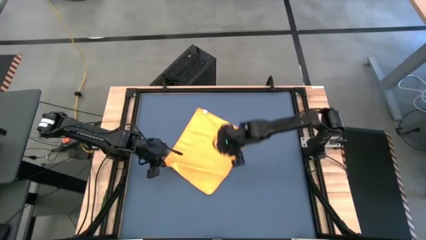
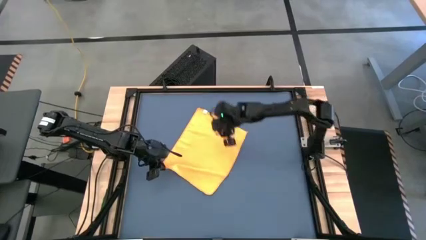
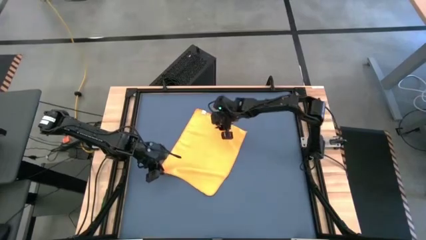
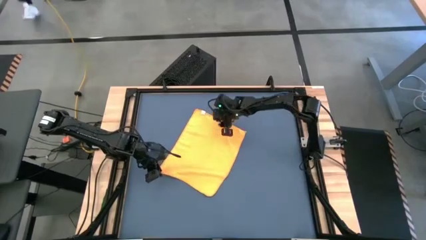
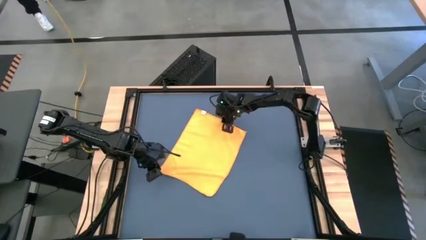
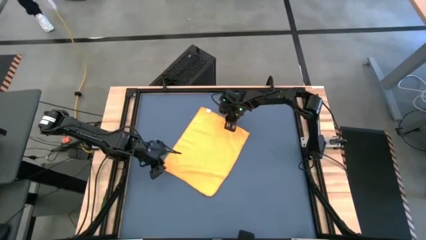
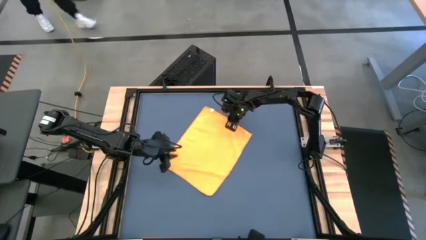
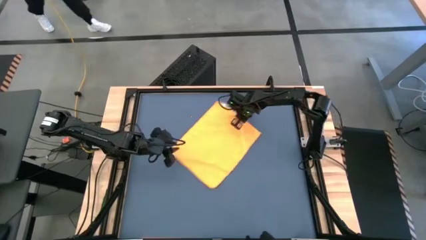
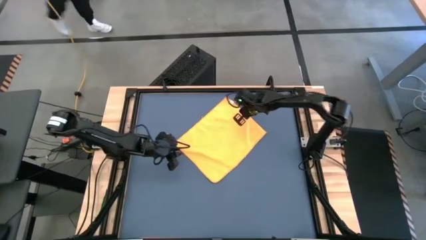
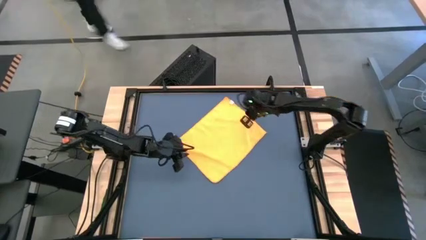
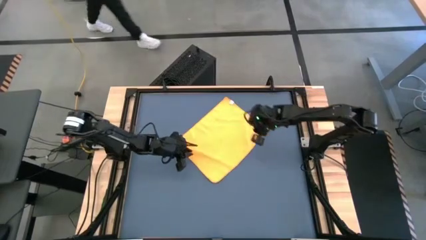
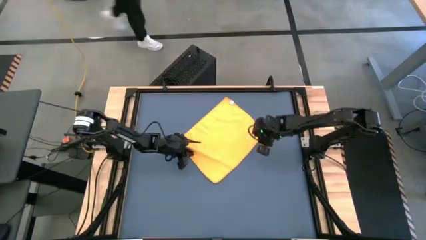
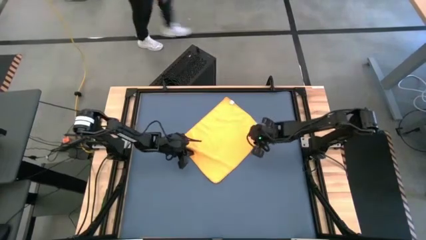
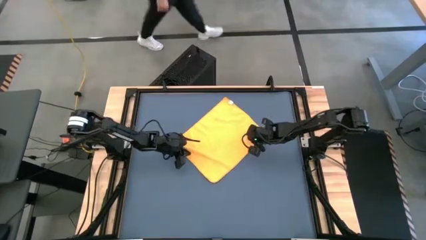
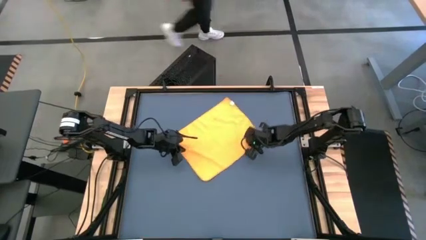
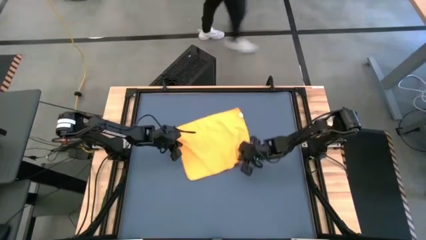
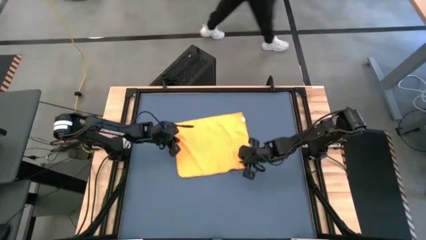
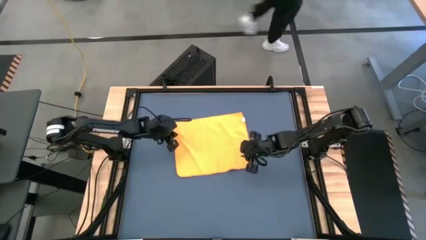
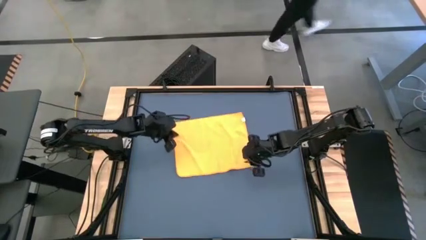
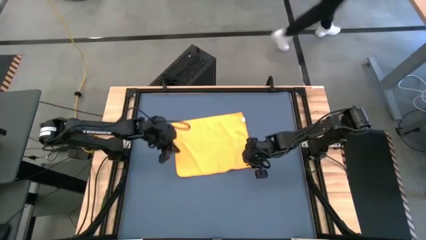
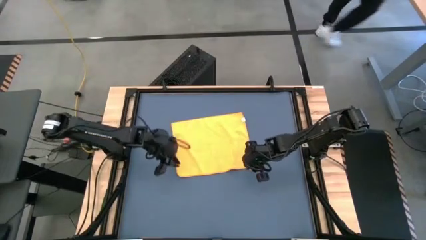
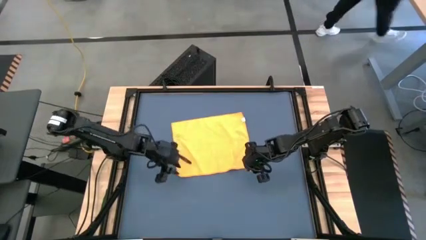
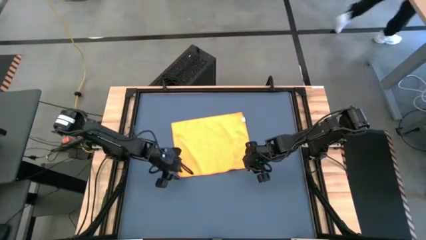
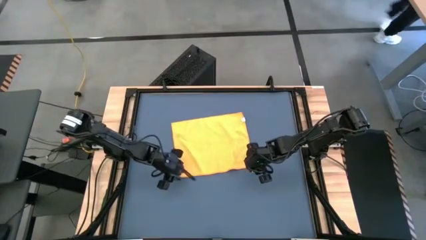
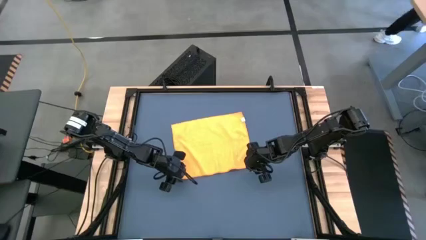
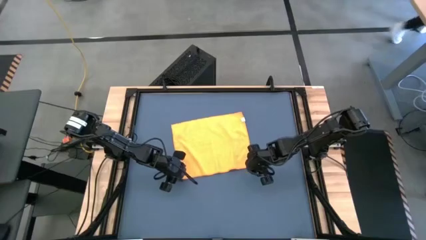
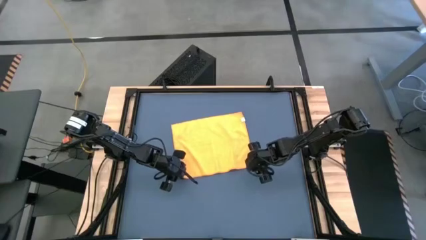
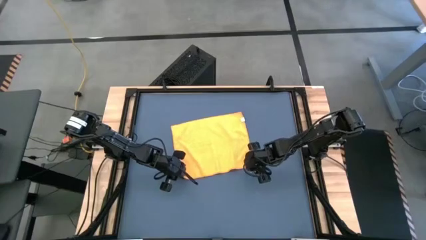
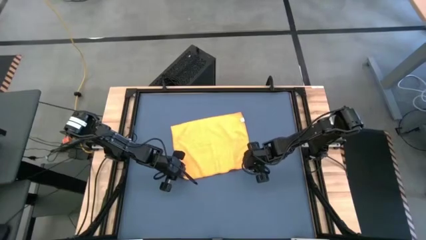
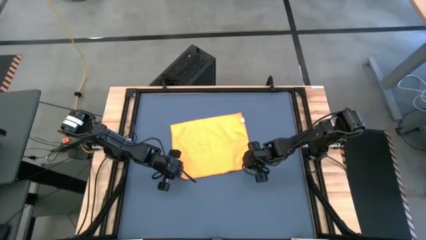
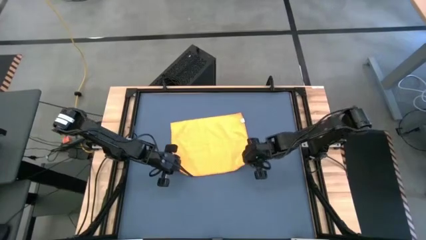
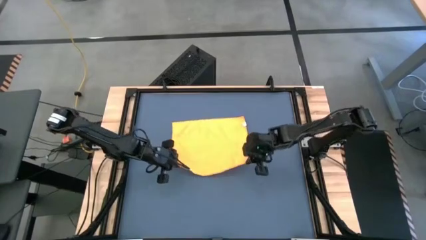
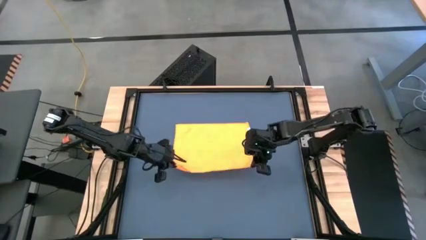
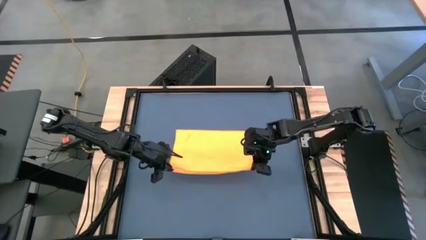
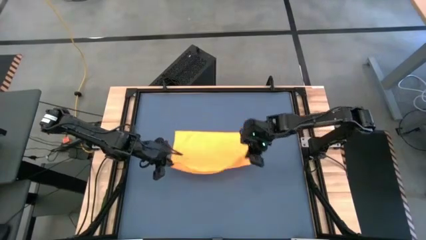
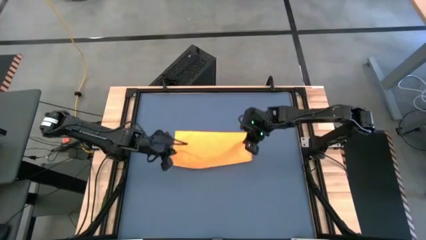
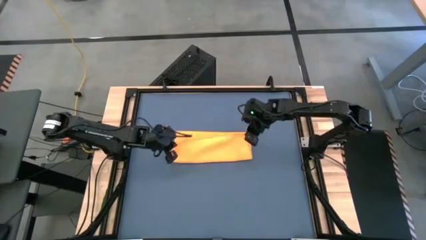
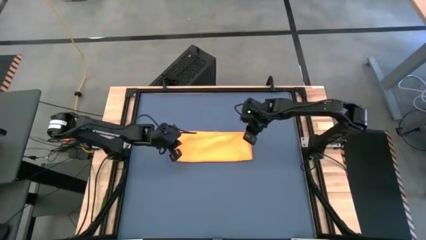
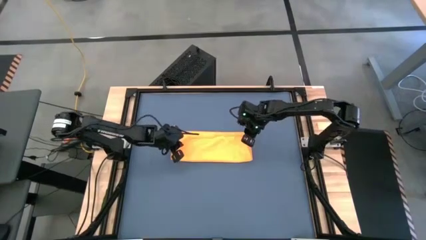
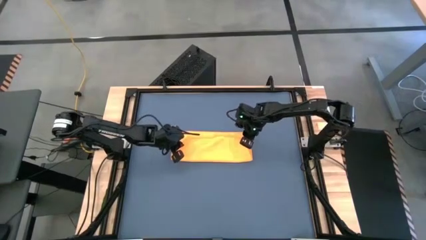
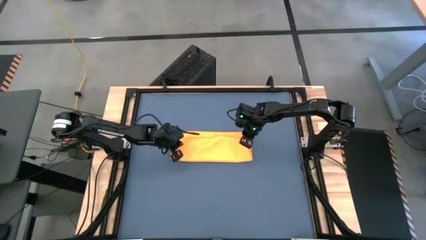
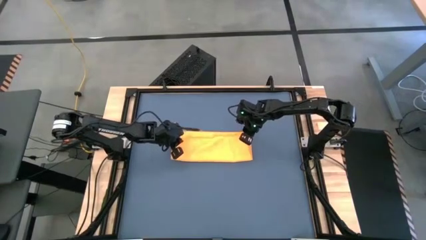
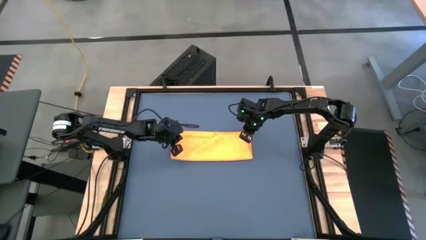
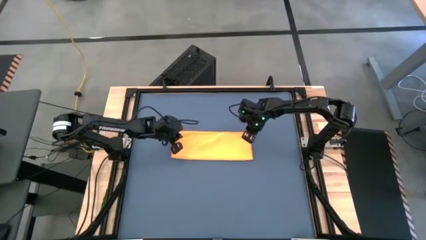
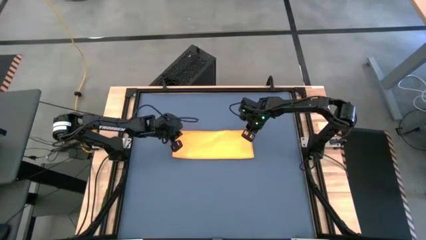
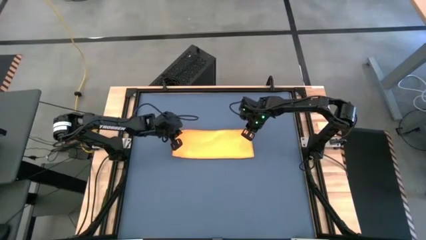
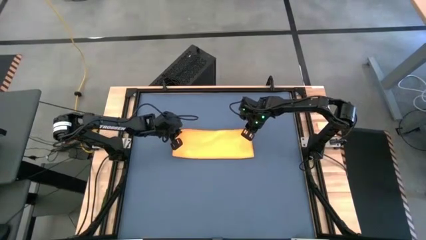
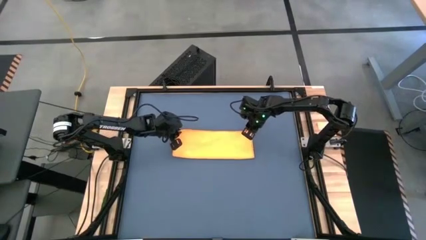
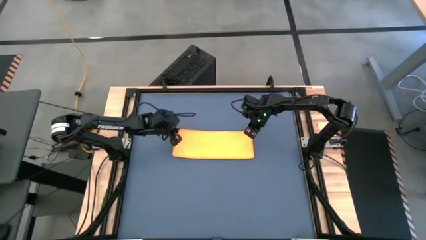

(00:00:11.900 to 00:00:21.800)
Task: Roll towel
Fold the yellow towel

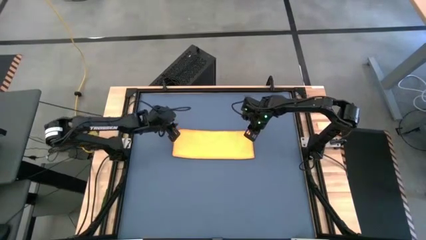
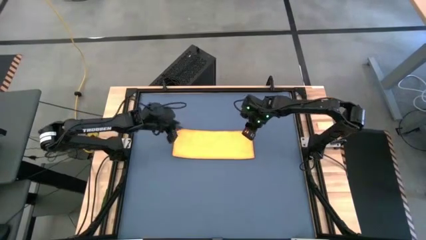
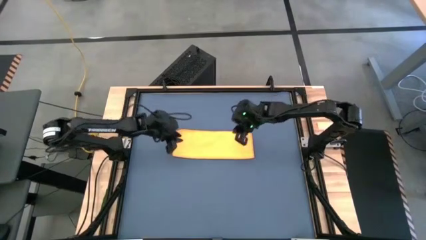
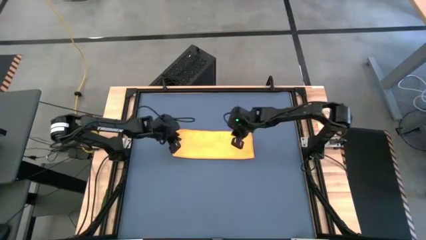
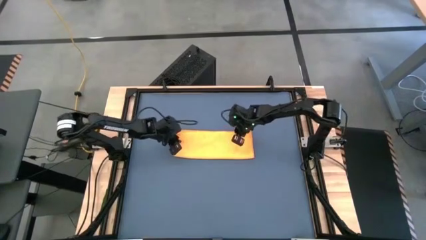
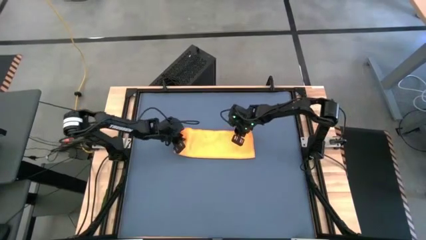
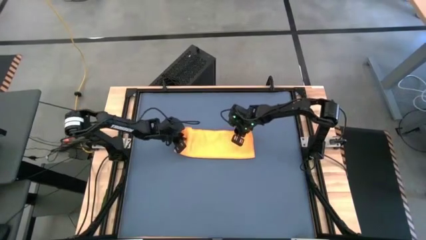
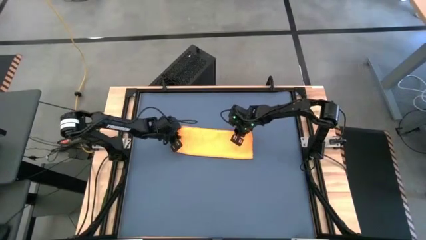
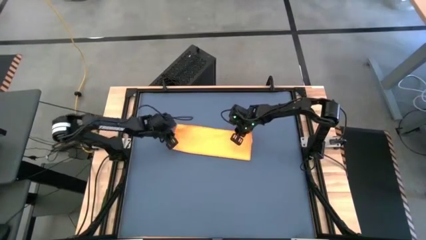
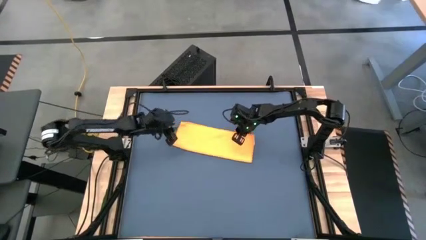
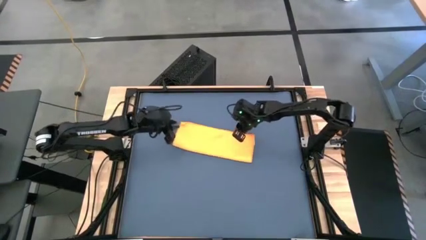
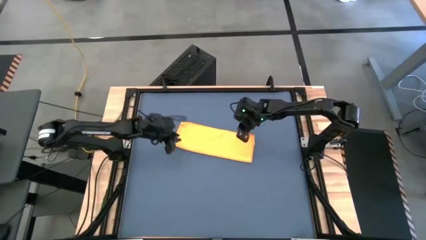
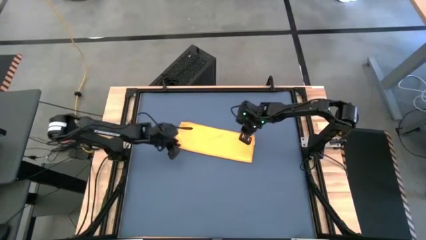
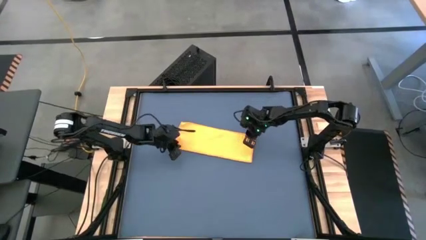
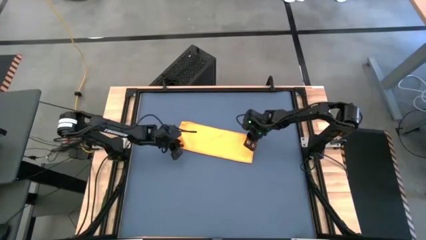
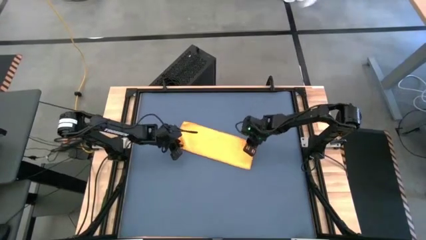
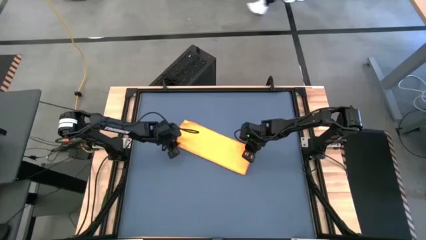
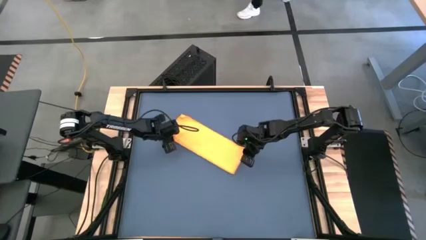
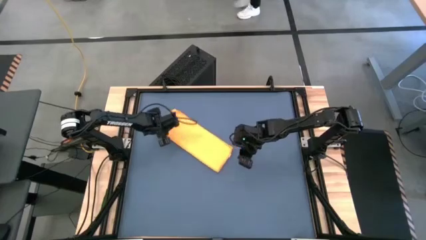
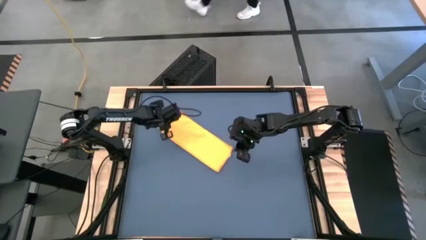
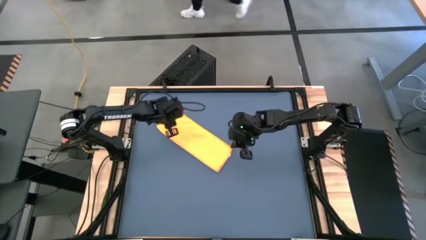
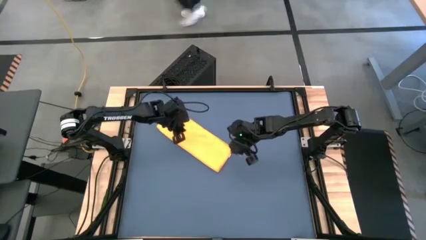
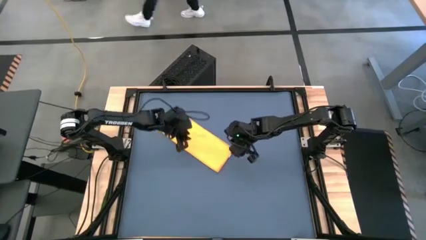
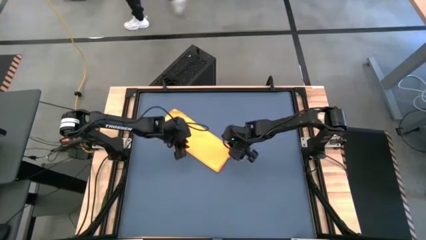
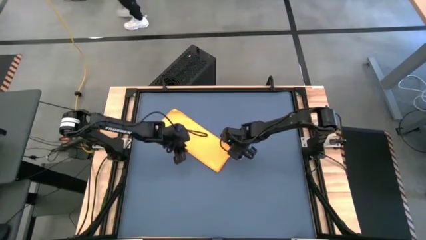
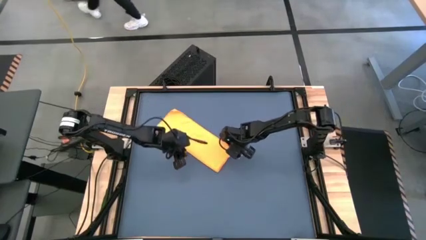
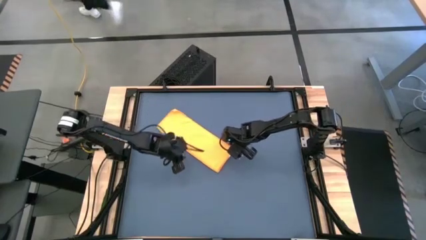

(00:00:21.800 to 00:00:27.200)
Roll the yellow towel
